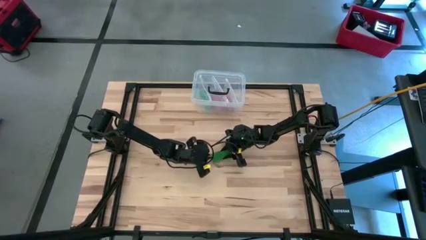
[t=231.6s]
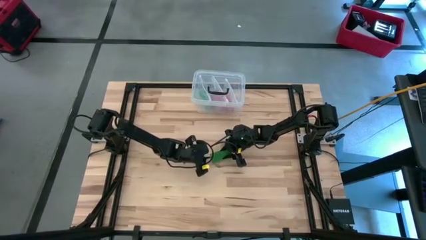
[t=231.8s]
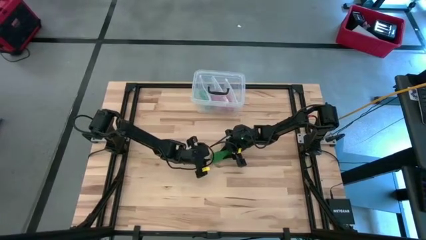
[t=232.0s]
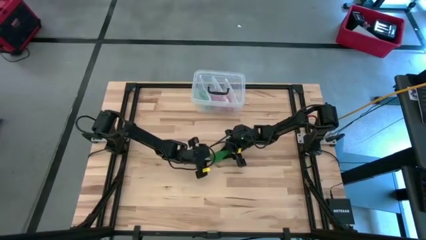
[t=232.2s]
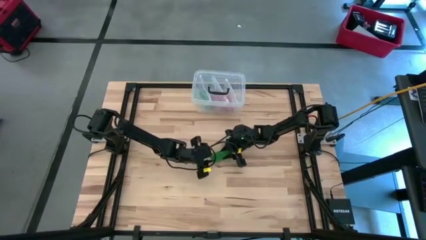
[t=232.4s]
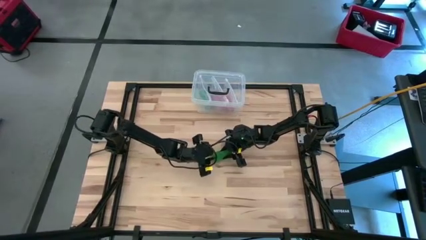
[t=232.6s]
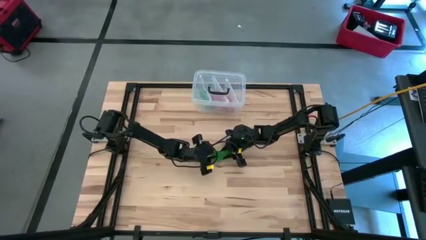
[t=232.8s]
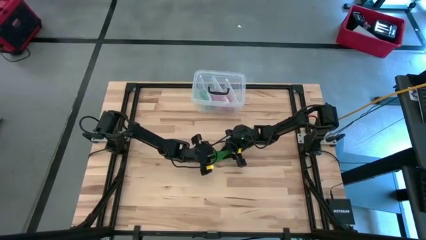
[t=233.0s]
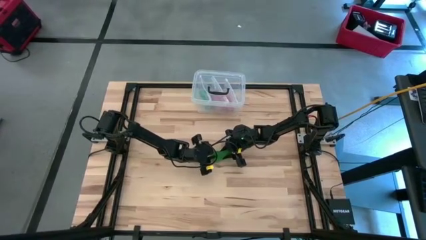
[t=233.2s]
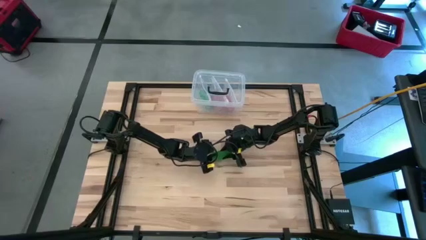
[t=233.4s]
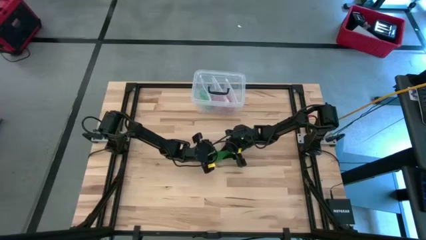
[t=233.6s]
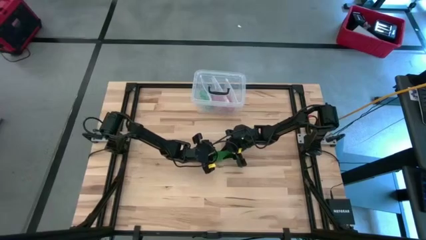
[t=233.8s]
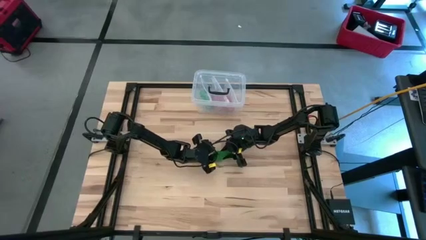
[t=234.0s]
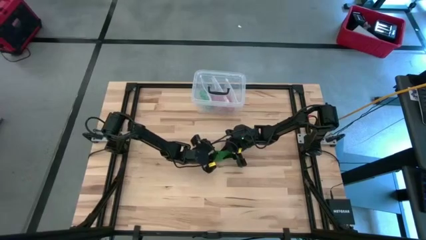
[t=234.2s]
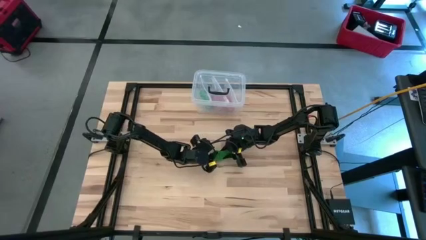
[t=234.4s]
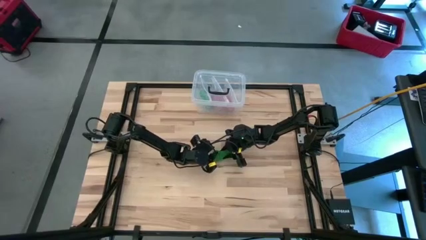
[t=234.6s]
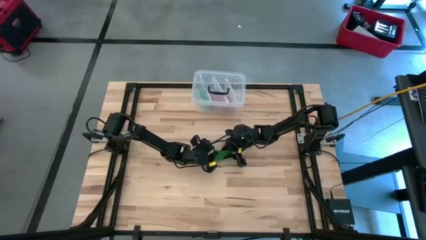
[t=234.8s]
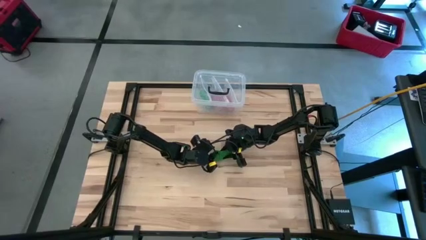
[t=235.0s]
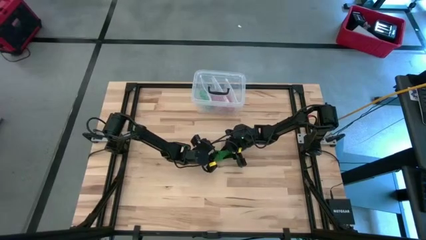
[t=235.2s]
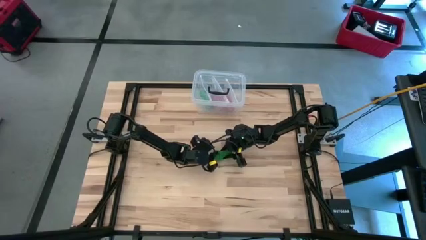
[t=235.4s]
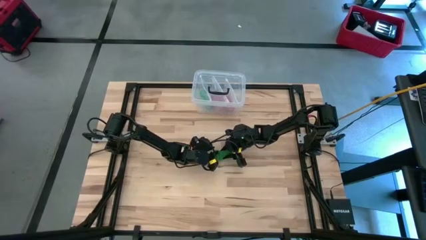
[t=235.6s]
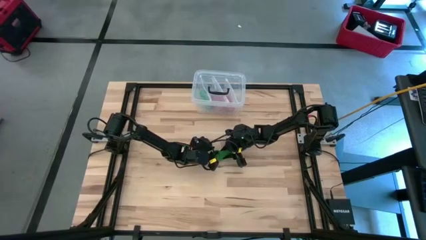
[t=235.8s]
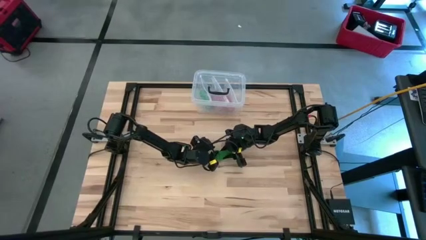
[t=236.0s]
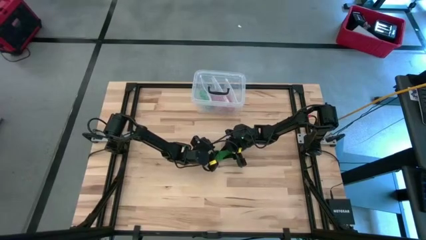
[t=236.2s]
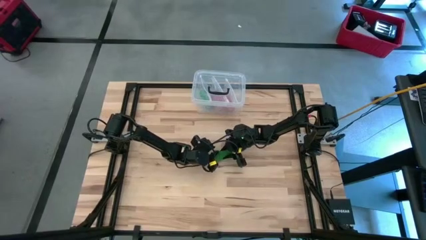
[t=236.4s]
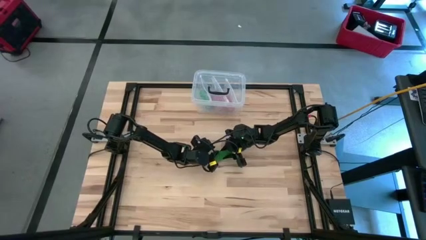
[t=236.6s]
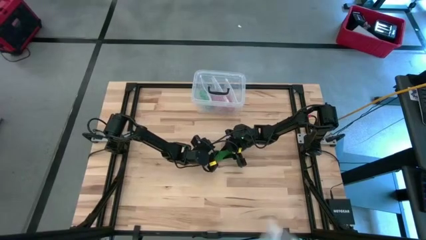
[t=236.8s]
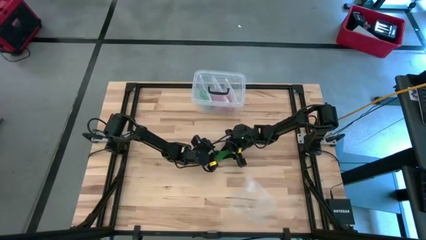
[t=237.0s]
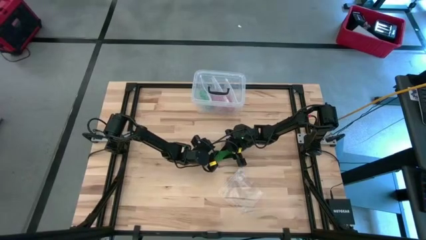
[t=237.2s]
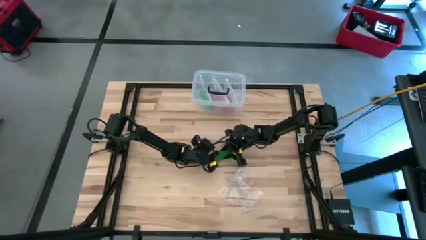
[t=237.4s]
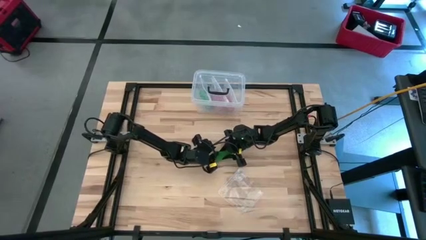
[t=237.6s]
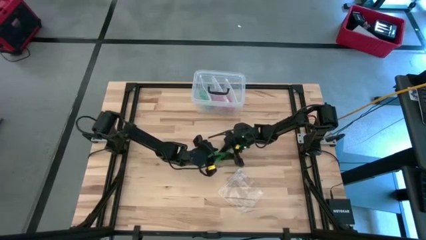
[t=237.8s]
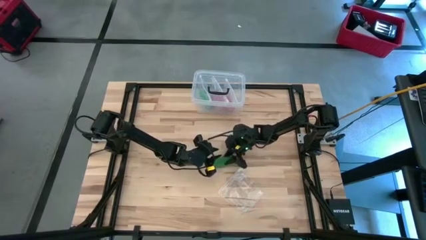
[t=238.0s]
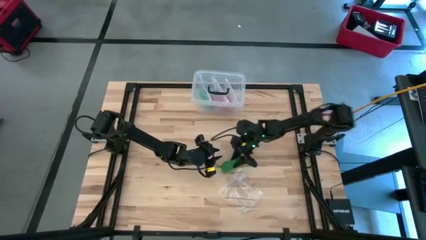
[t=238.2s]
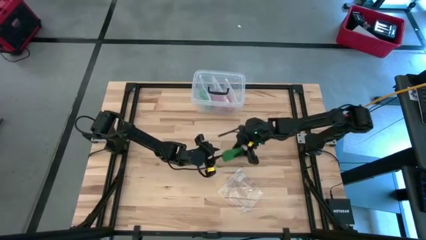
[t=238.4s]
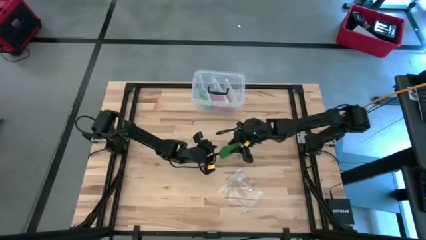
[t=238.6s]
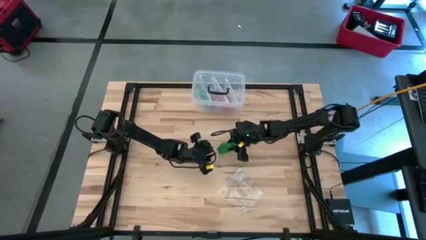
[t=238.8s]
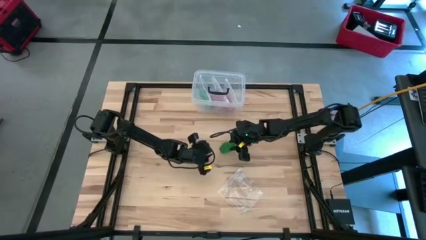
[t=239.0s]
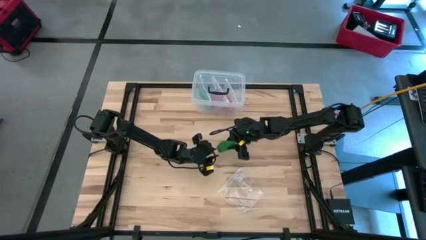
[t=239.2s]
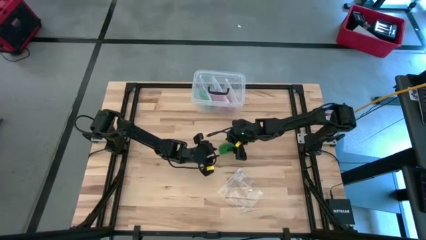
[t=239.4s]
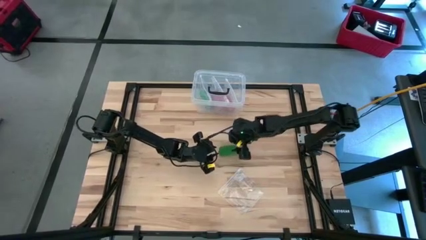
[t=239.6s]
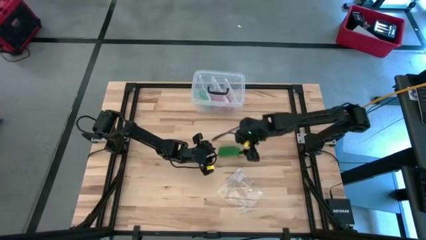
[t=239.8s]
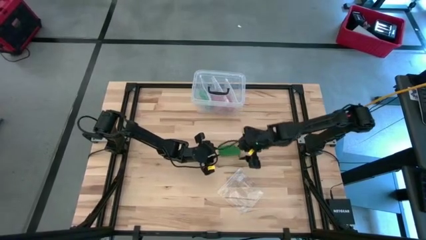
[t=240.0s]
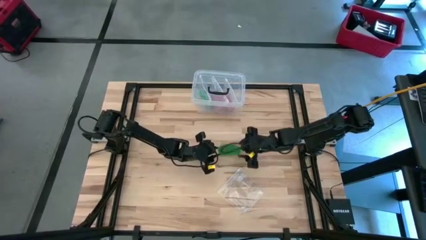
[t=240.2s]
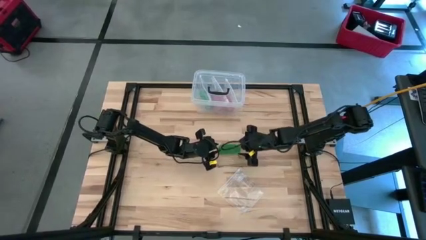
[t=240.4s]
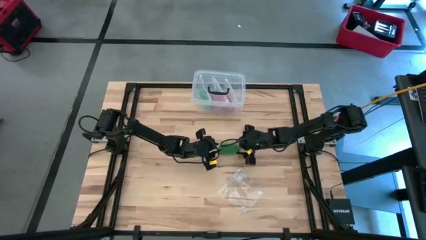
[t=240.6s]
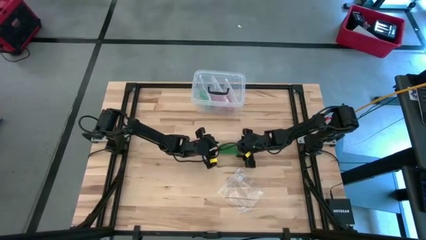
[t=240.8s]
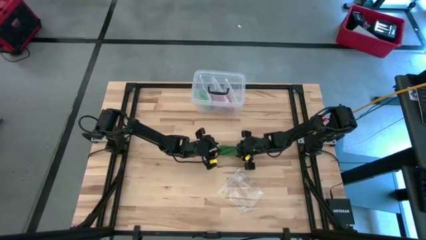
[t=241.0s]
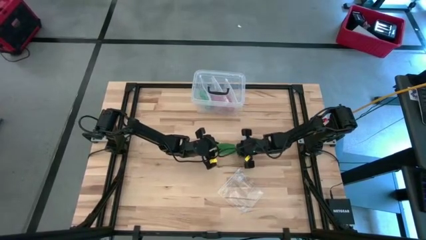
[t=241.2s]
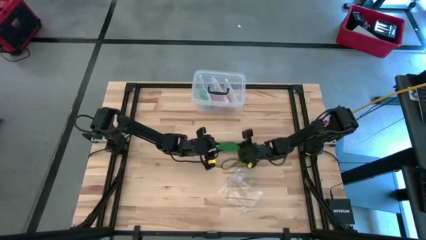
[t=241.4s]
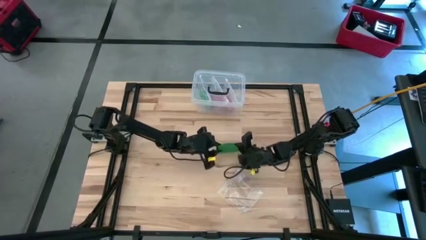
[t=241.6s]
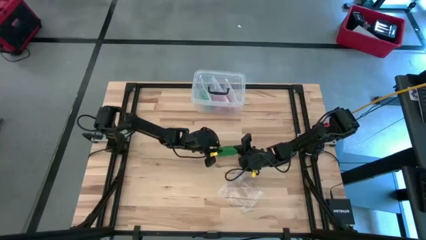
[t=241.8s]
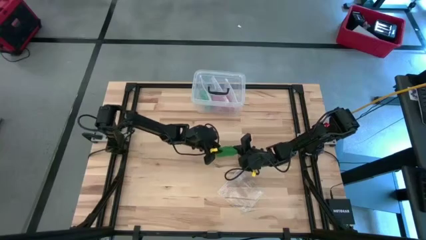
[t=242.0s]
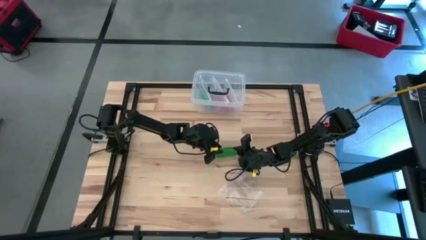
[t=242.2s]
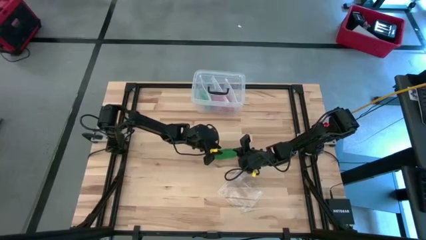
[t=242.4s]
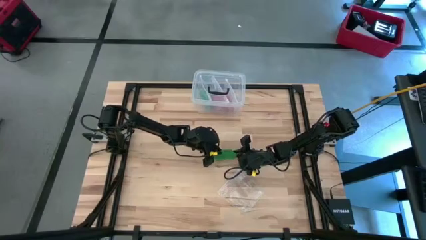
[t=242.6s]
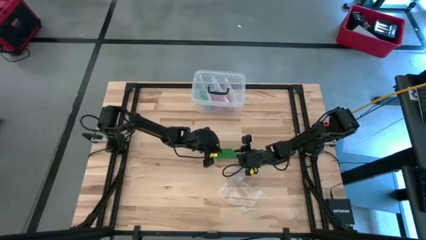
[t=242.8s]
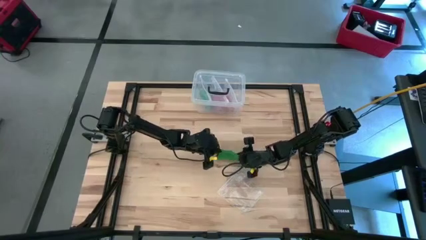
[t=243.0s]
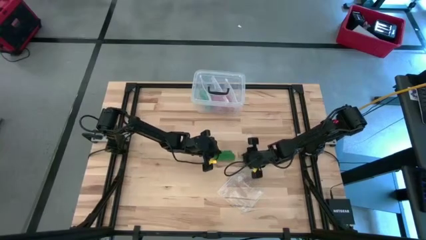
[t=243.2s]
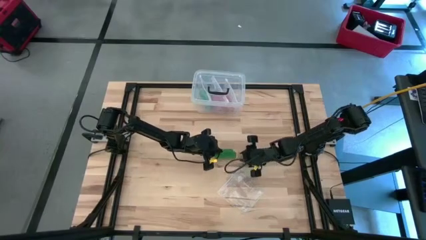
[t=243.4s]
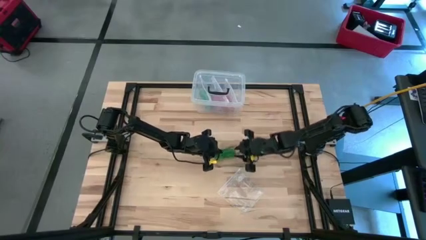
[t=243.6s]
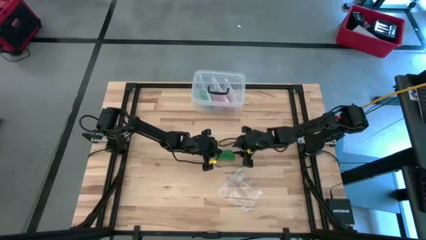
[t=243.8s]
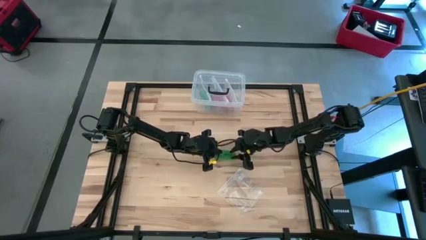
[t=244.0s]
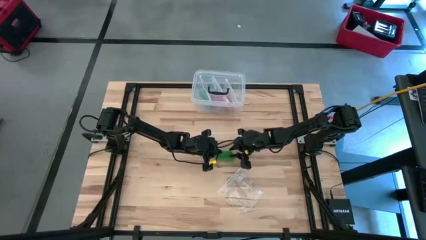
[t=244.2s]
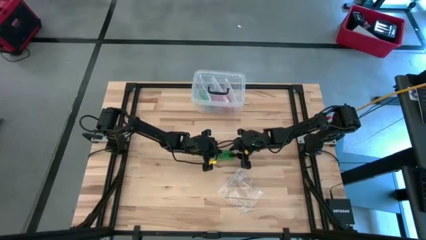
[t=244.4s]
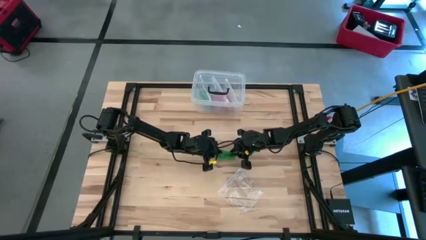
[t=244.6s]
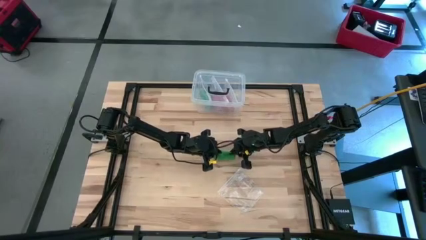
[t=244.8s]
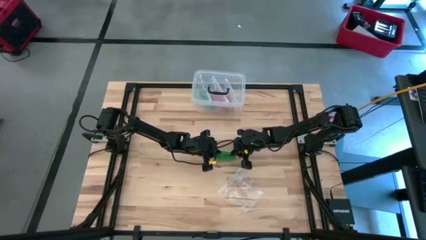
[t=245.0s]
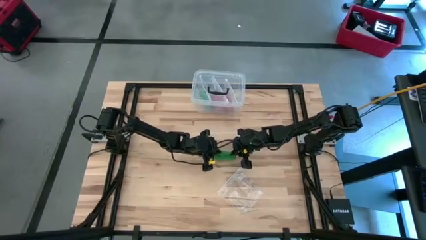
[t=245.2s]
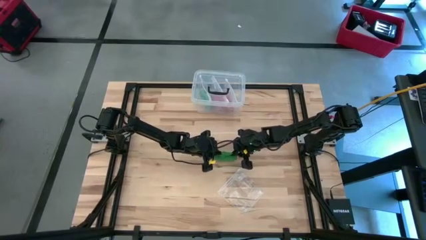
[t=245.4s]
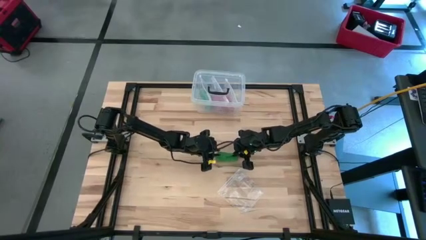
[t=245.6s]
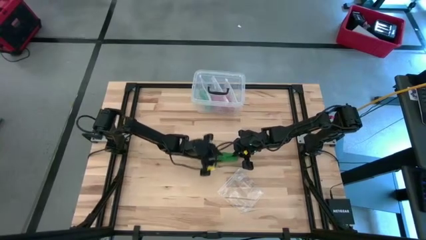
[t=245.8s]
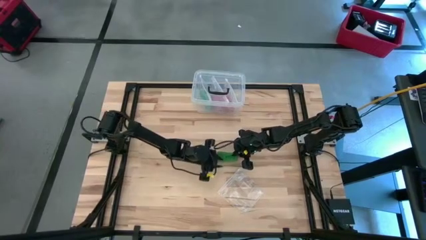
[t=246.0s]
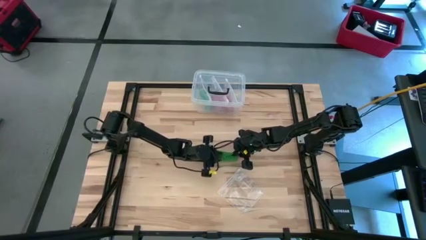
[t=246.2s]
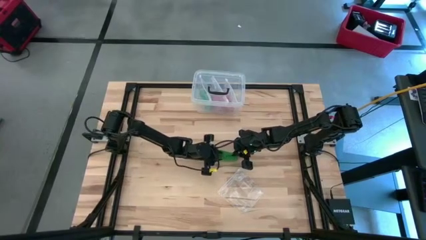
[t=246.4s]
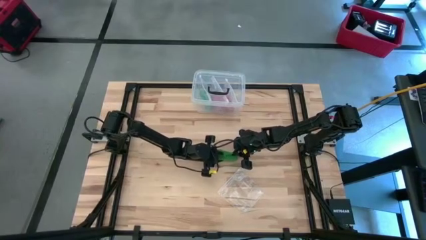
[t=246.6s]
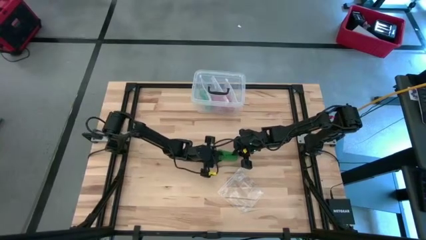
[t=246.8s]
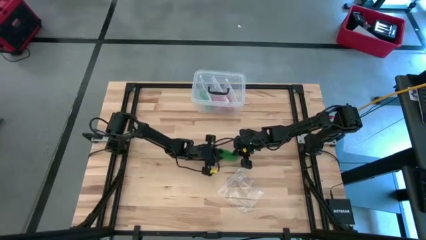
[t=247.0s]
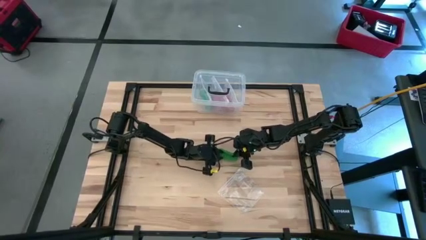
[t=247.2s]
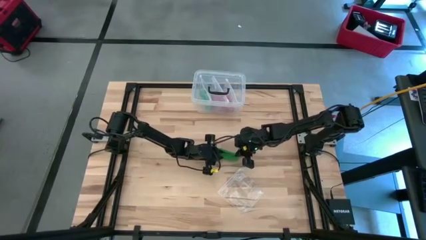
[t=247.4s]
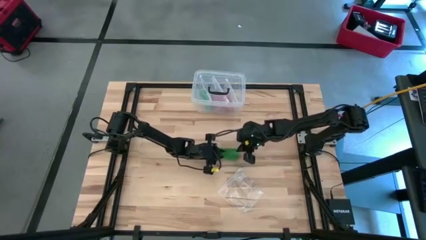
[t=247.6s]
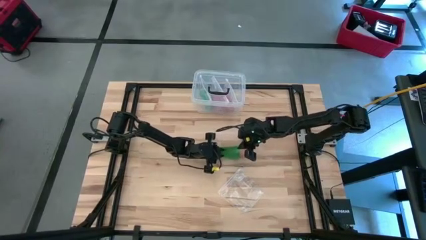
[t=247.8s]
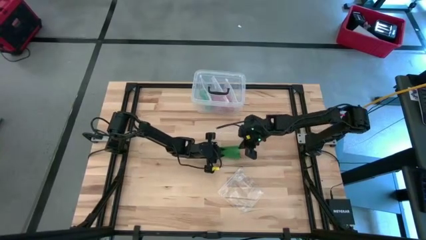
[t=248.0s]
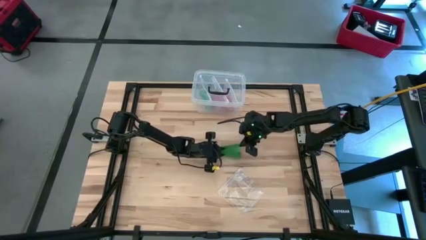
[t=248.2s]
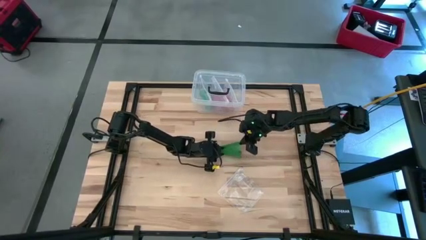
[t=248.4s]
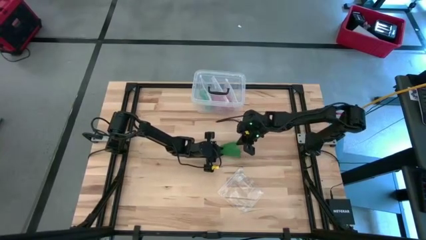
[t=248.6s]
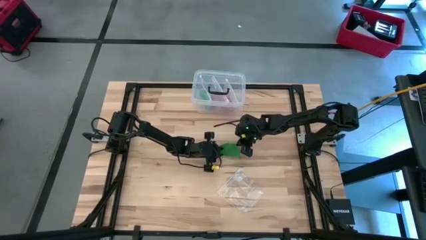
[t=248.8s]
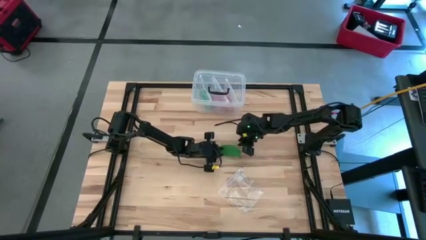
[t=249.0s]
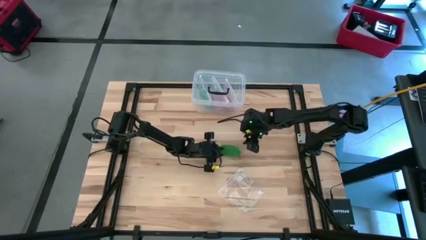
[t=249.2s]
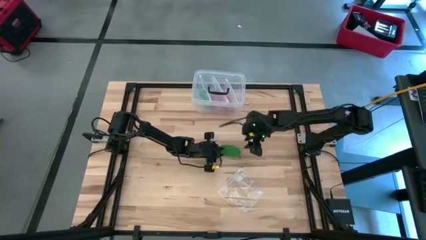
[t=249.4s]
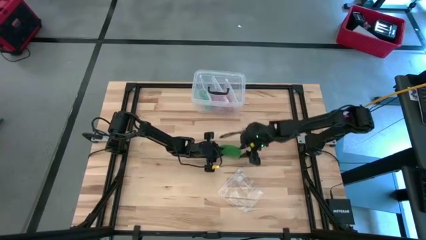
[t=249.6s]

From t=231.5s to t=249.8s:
Task: Roll bandage
Roll the green bandage
